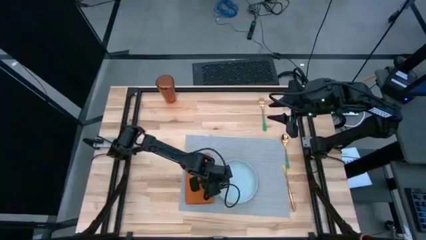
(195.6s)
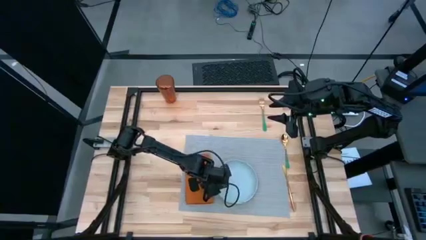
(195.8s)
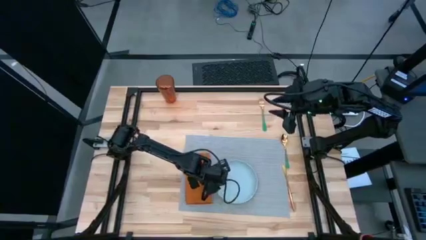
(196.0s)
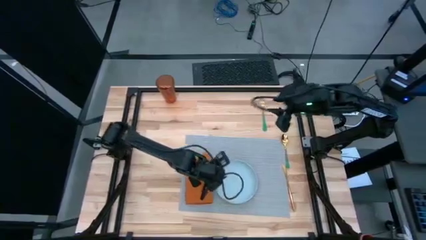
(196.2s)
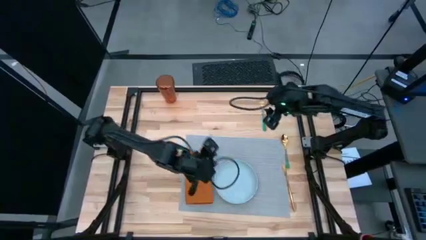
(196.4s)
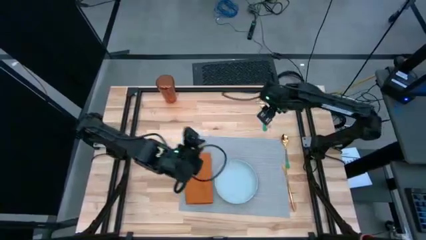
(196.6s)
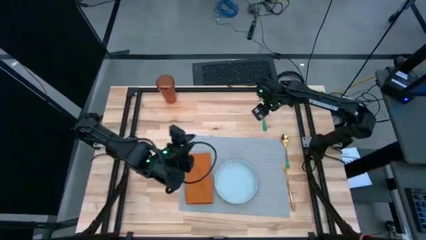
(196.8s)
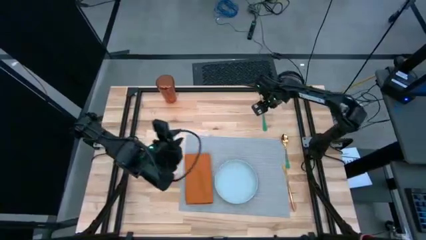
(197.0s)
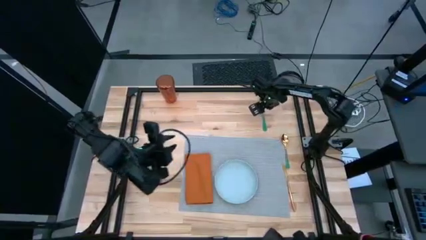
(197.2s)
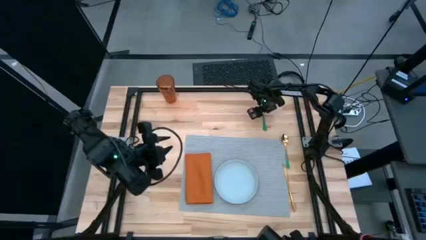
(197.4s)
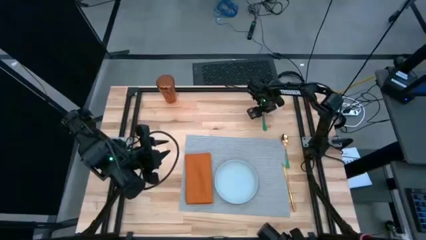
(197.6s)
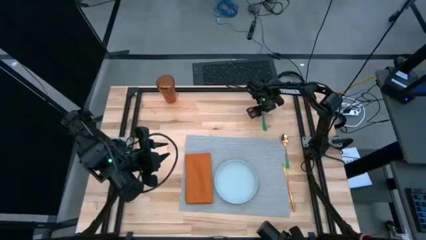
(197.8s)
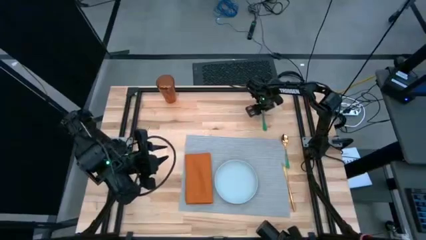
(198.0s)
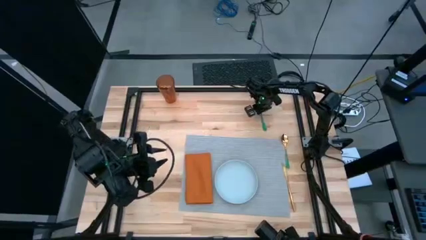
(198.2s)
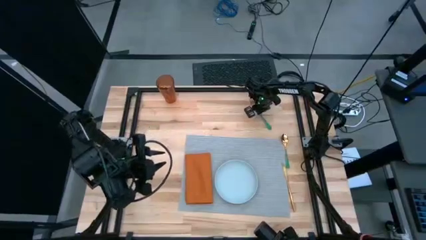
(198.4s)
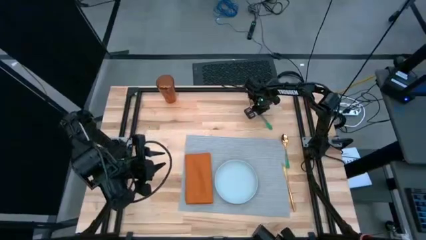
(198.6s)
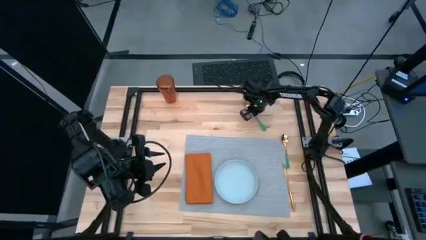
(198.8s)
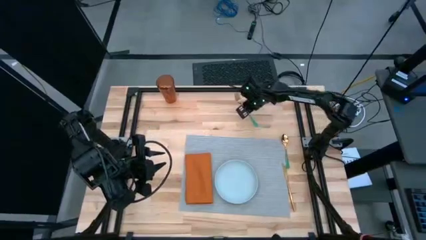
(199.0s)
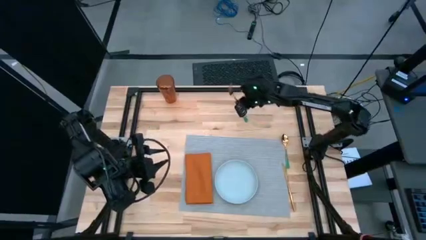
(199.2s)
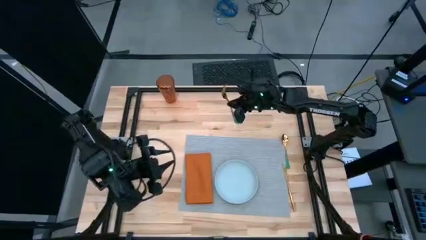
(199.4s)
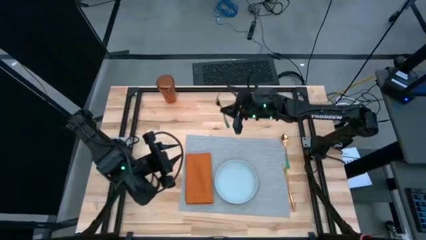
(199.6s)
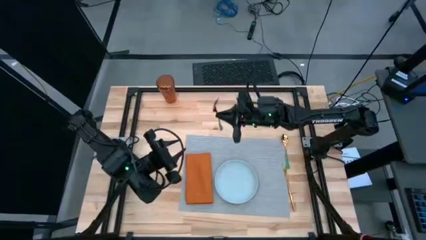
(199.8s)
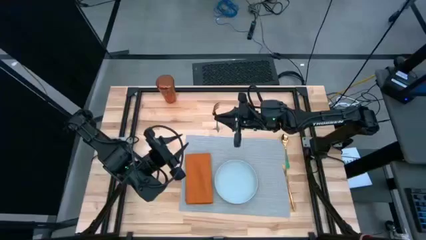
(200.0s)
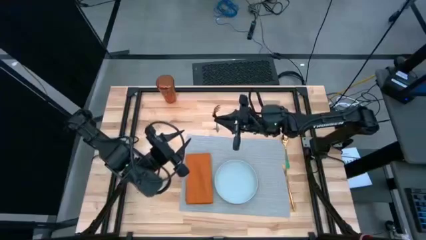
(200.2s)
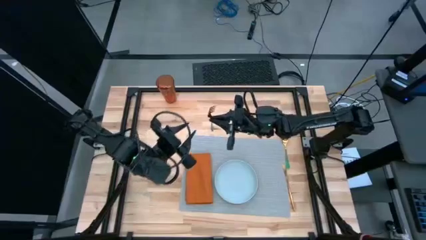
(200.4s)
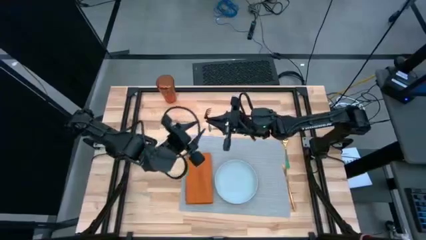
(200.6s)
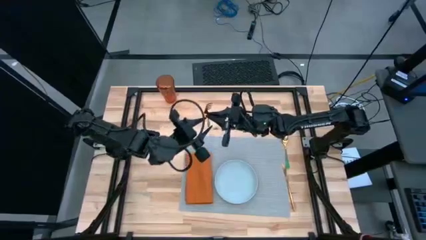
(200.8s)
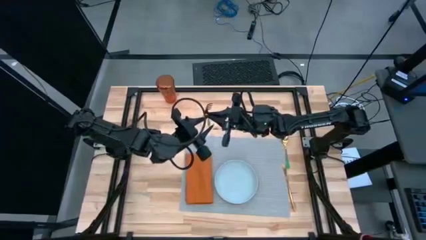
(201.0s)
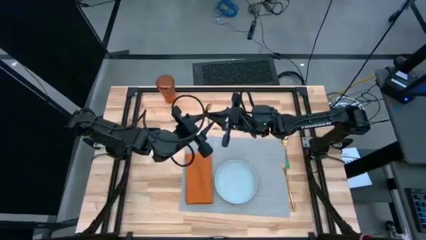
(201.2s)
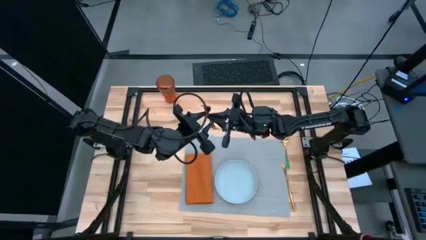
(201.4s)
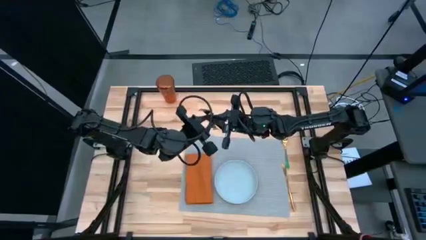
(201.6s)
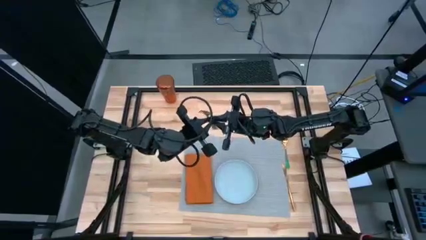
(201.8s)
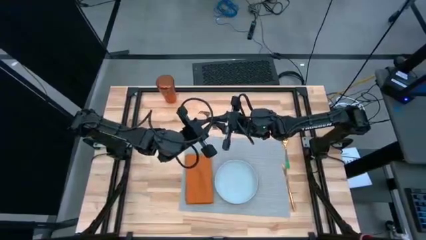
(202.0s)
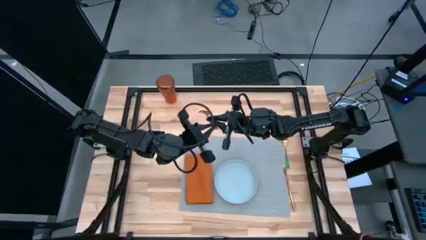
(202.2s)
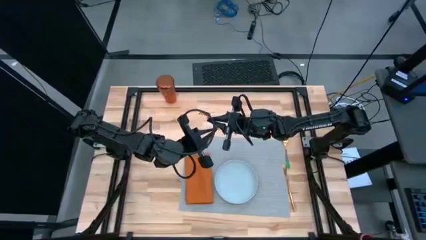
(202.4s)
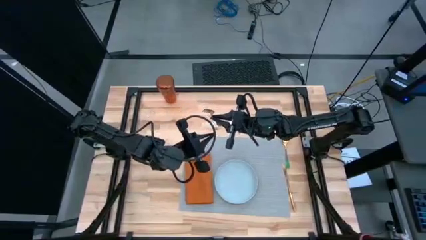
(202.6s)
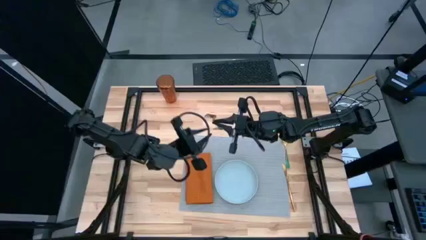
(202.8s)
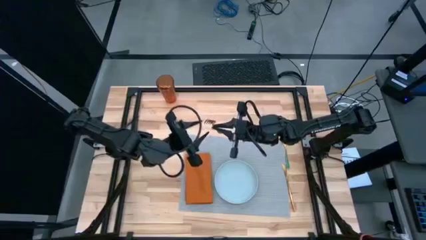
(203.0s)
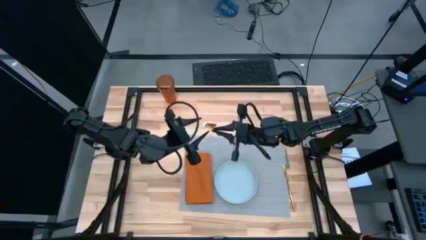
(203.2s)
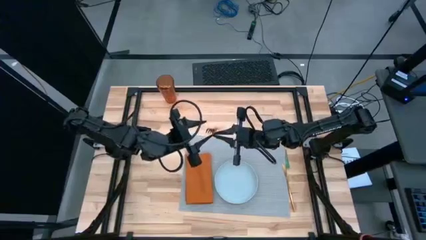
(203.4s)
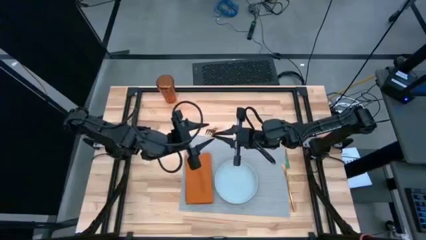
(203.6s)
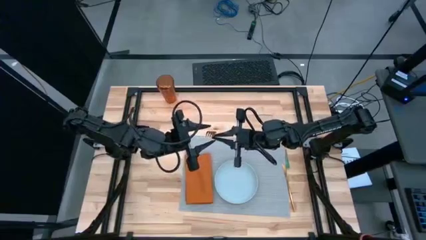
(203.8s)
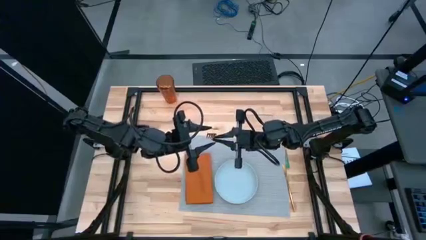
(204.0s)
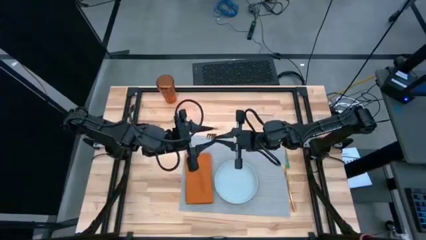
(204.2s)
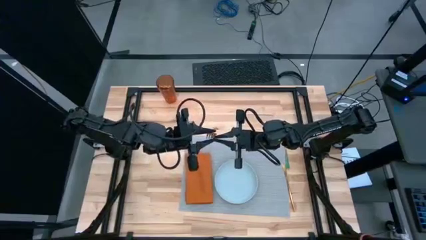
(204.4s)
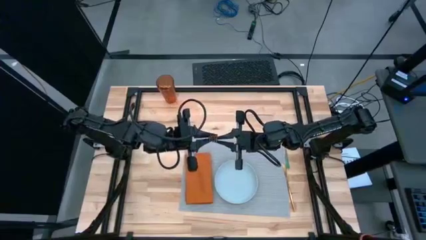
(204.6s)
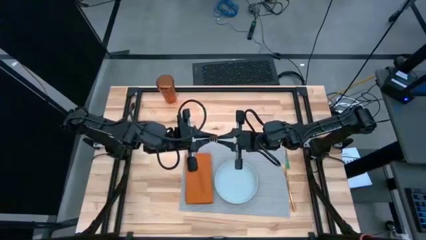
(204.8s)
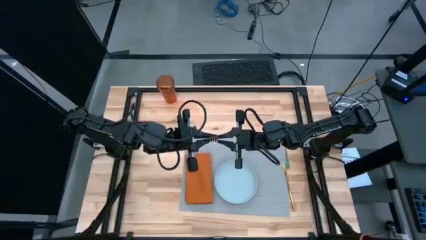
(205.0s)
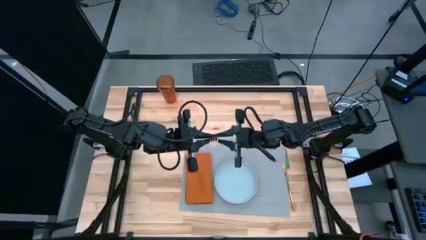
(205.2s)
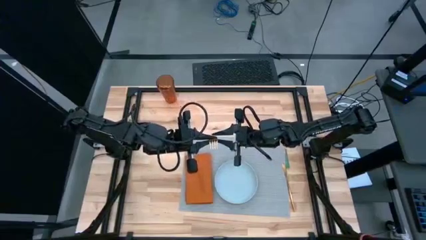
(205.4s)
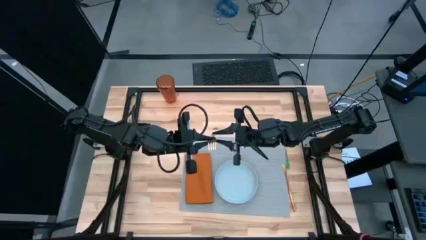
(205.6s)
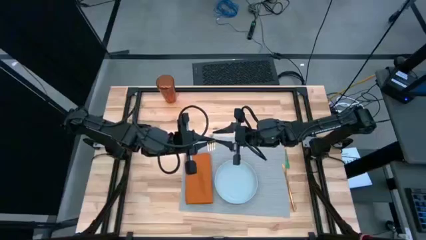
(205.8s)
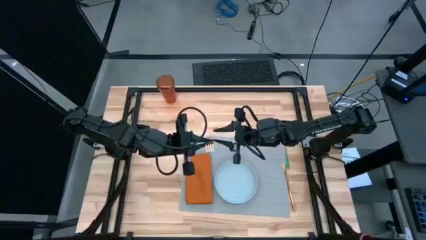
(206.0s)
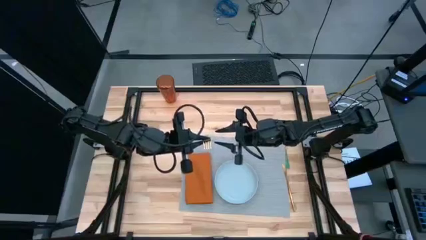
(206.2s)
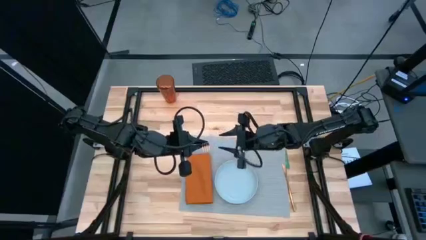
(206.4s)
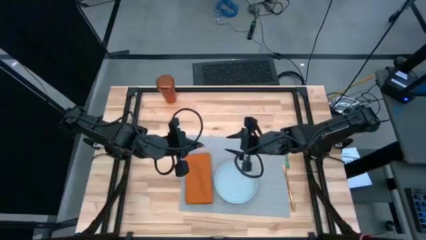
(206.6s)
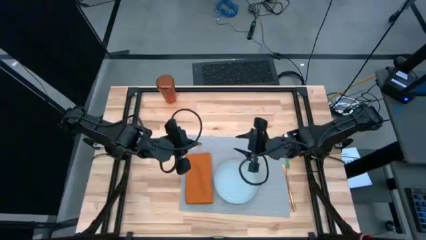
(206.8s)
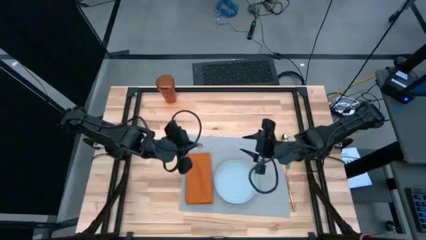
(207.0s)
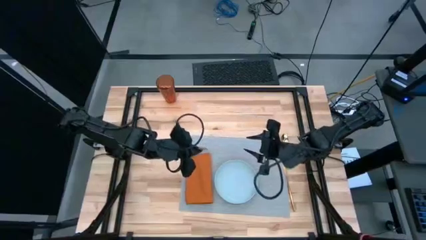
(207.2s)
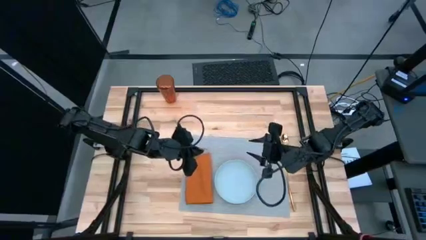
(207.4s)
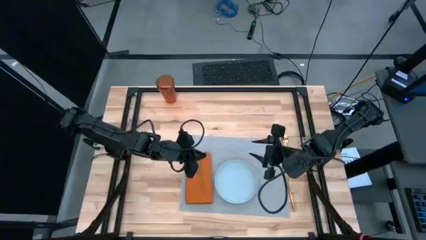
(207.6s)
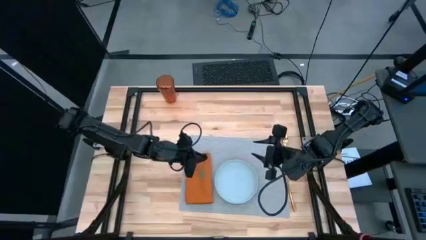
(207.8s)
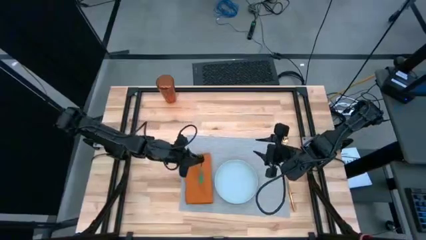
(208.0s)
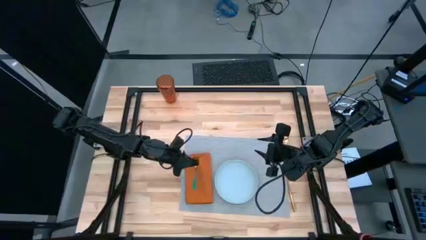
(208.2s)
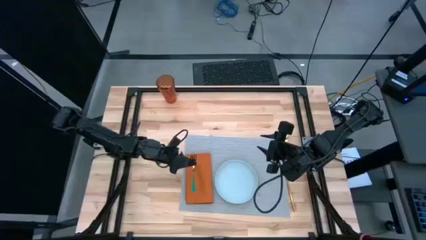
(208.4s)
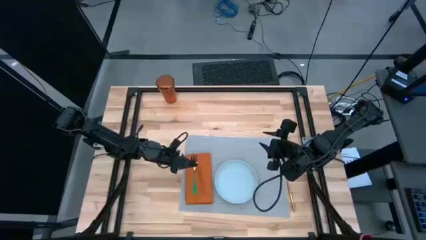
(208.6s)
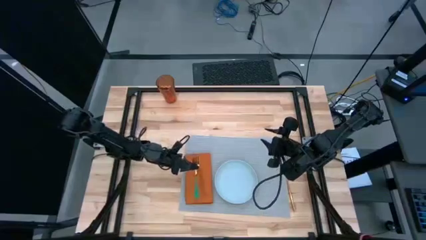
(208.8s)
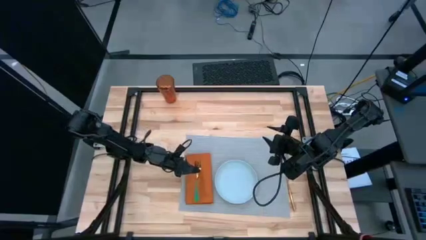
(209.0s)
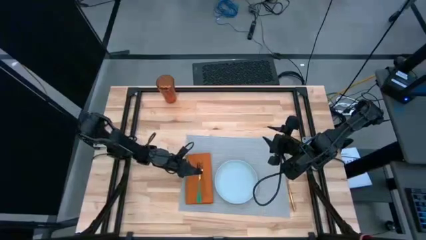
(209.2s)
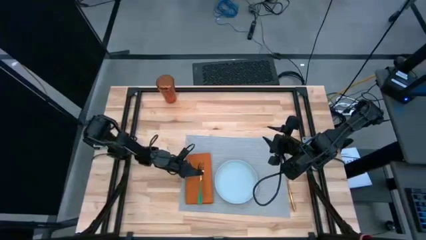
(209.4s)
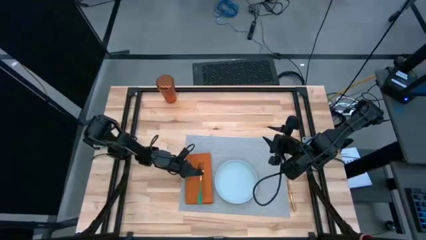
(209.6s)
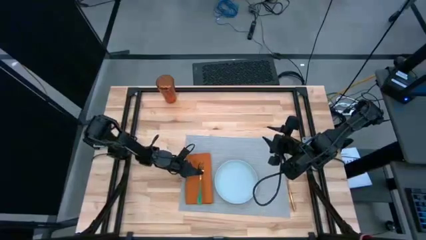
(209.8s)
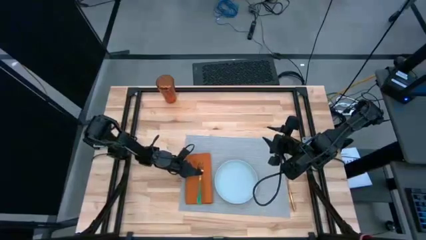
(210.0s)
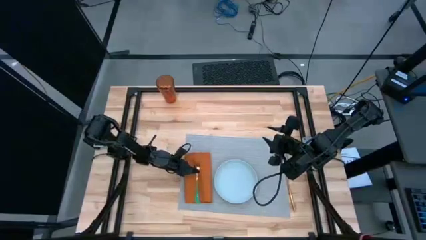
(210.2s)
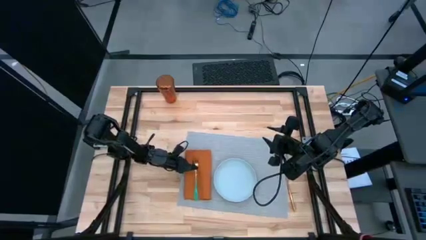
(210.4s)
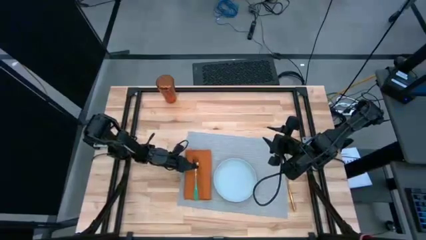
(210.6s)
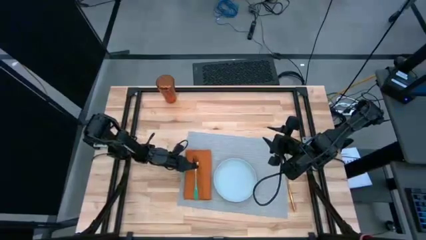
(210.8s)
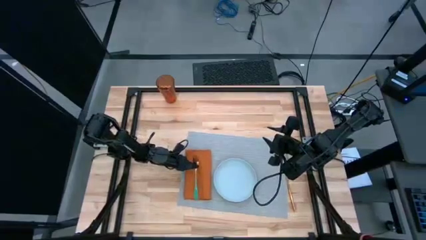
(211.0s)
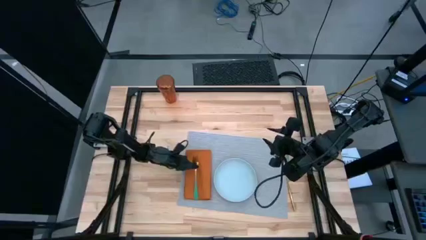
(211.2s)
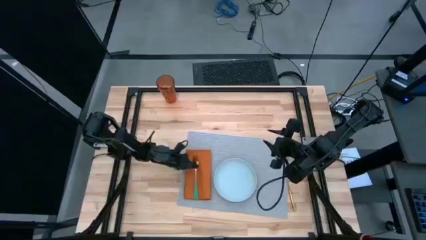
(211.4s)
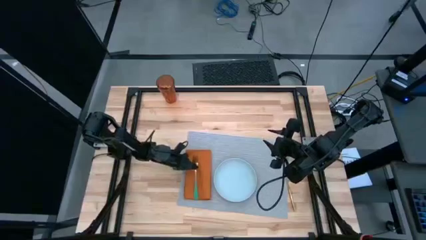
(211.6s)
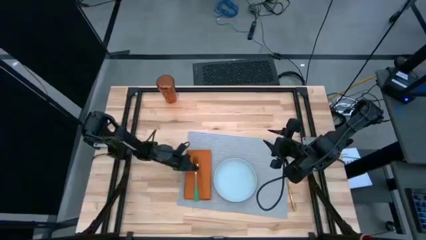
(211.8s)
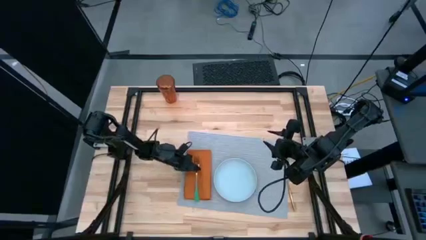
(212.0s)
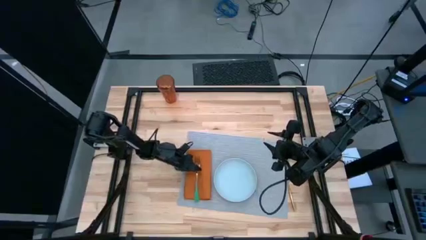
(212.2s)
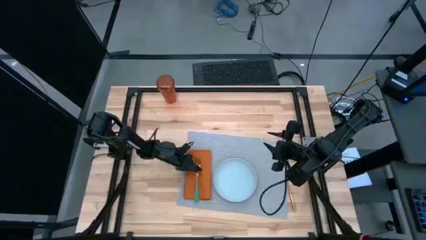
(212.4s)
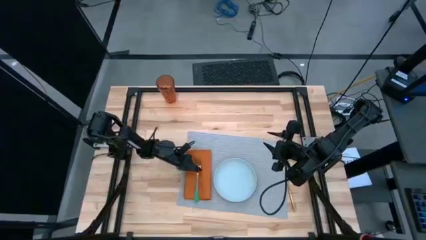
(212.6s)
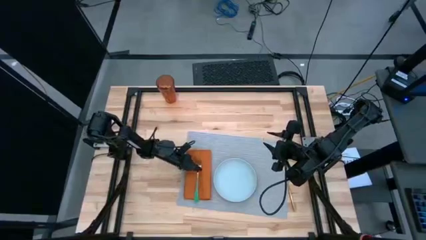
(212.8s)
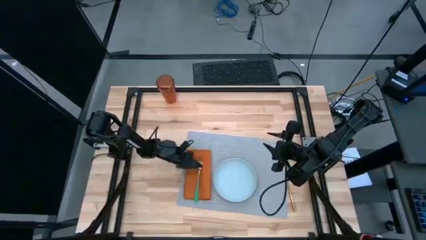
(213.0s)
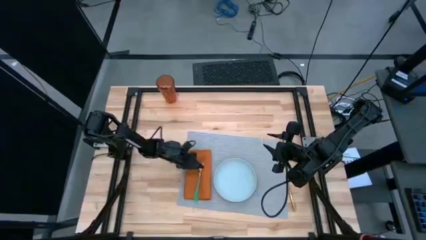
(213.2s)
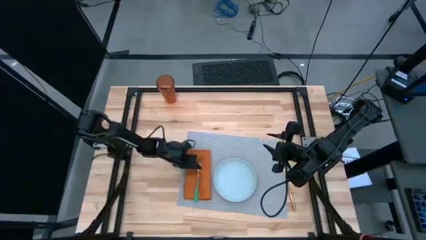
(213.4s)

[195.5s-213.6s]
Task: Set table place
Put the green fork on top of the orange napkin on the gray placemat
